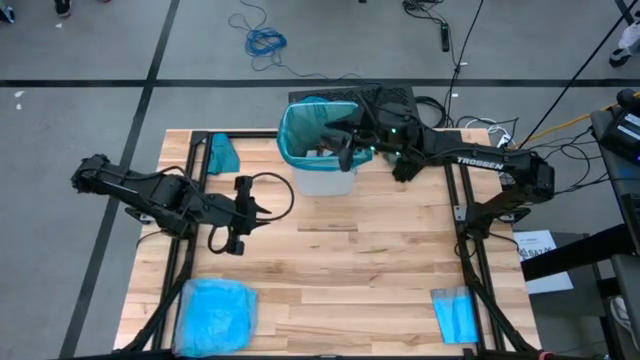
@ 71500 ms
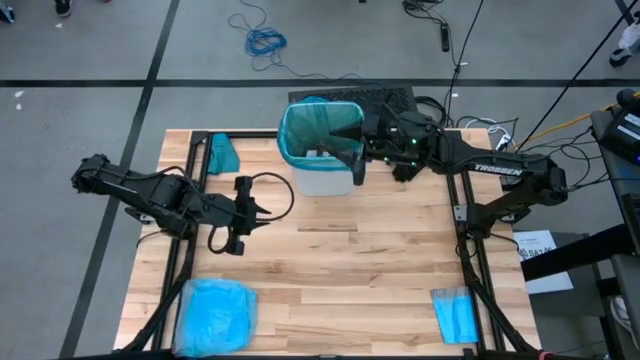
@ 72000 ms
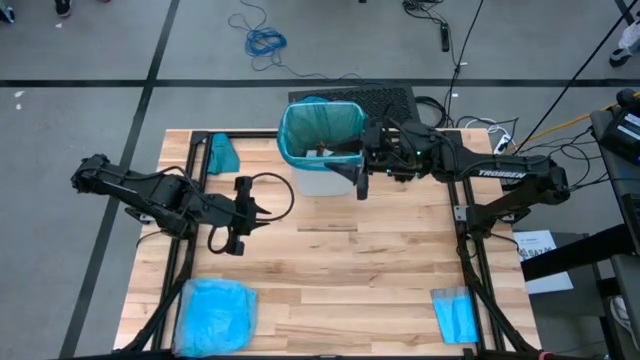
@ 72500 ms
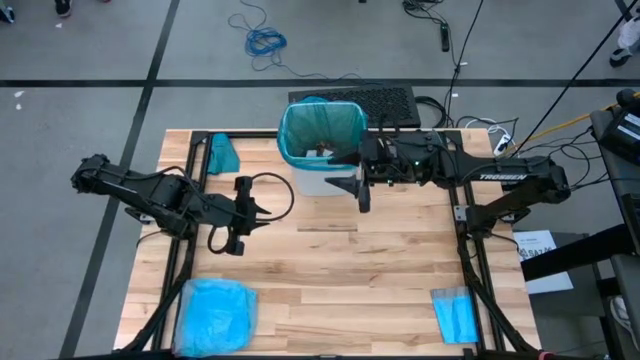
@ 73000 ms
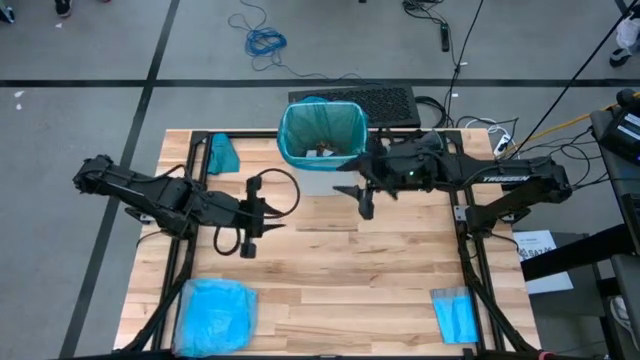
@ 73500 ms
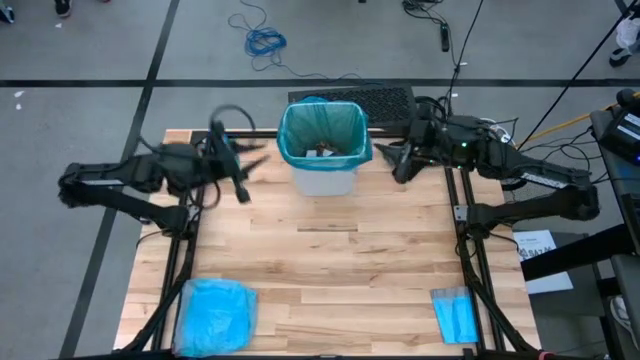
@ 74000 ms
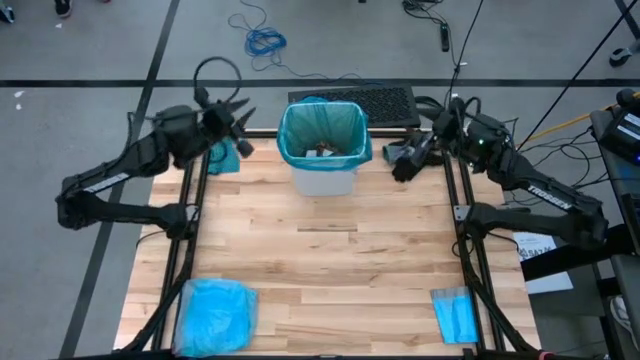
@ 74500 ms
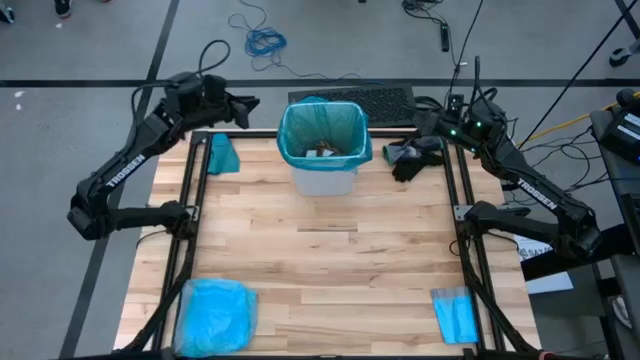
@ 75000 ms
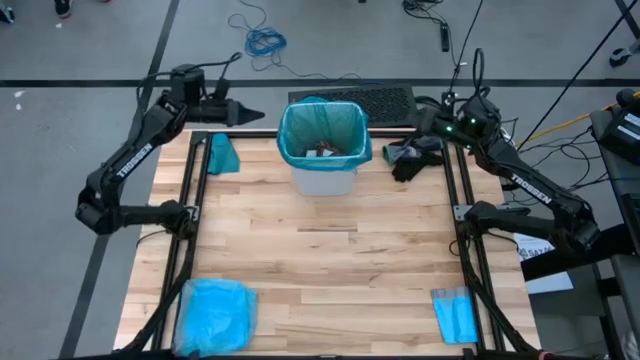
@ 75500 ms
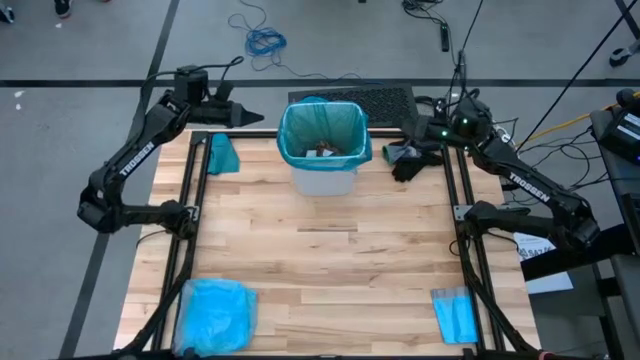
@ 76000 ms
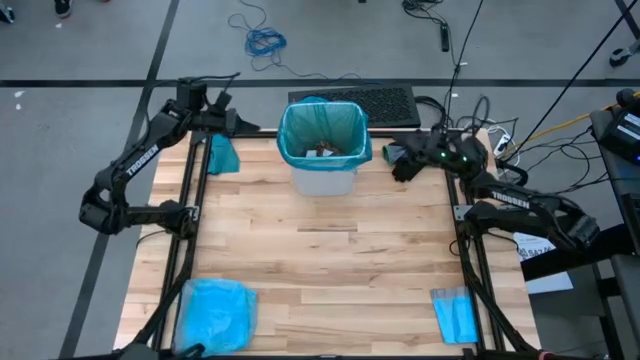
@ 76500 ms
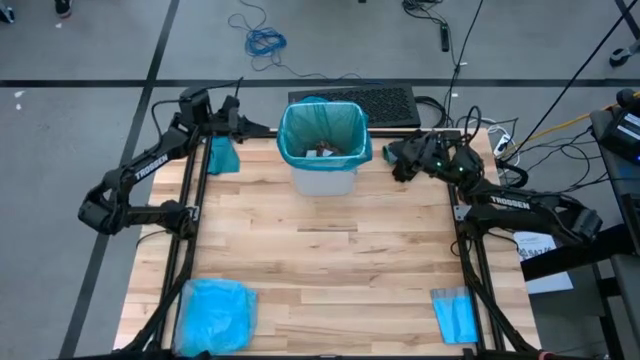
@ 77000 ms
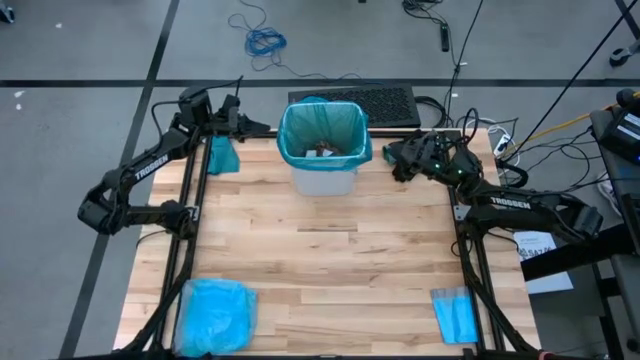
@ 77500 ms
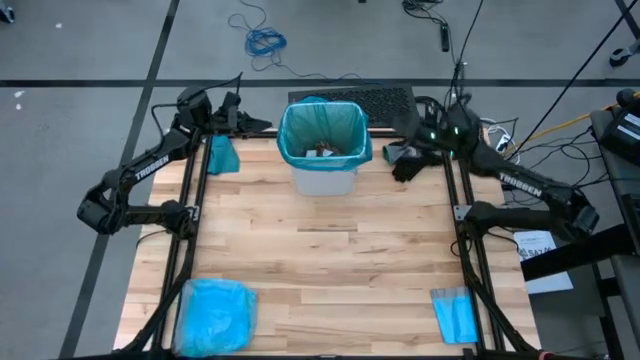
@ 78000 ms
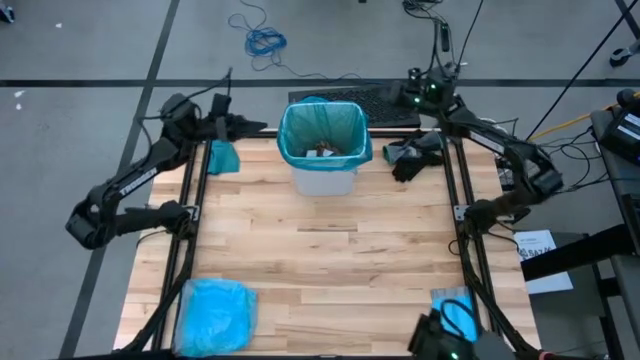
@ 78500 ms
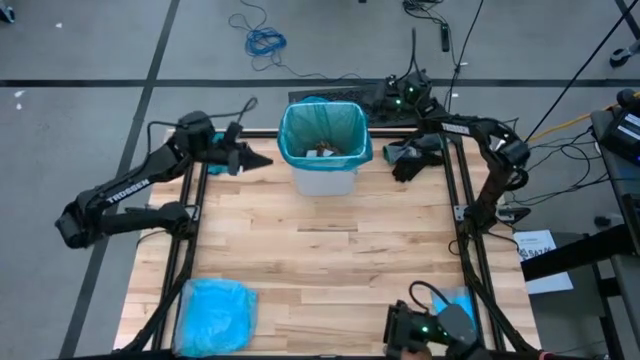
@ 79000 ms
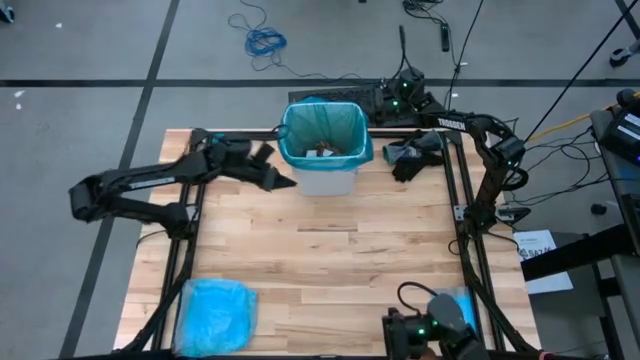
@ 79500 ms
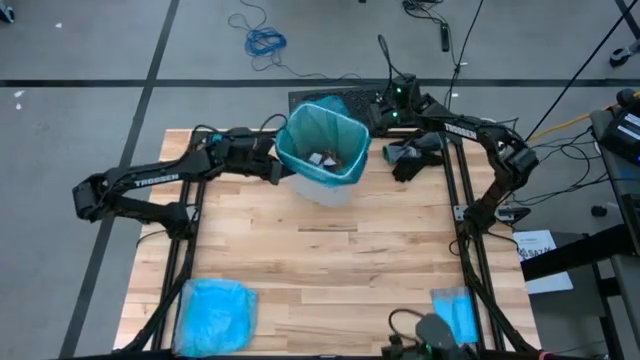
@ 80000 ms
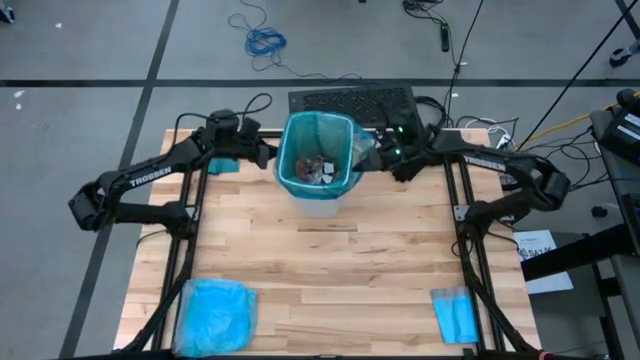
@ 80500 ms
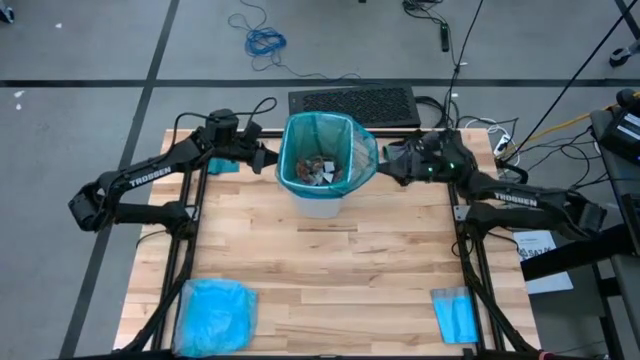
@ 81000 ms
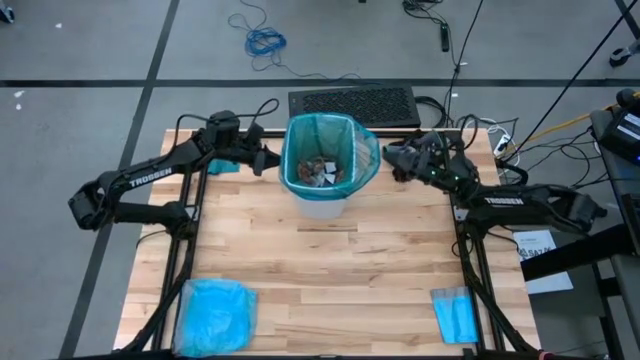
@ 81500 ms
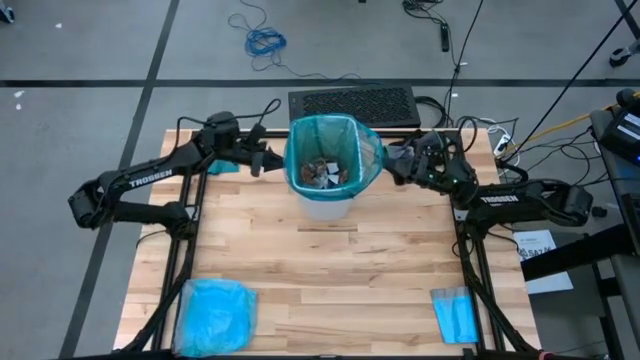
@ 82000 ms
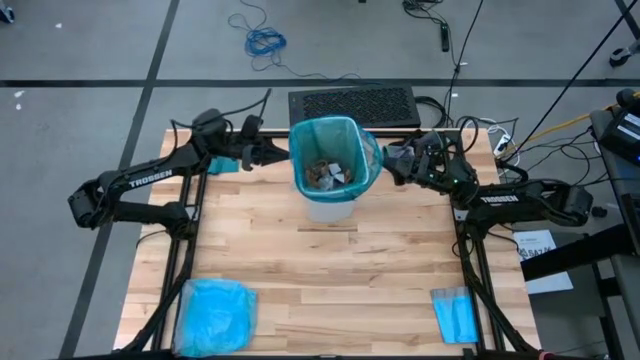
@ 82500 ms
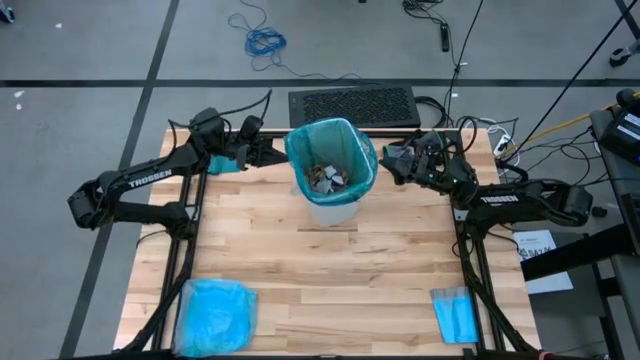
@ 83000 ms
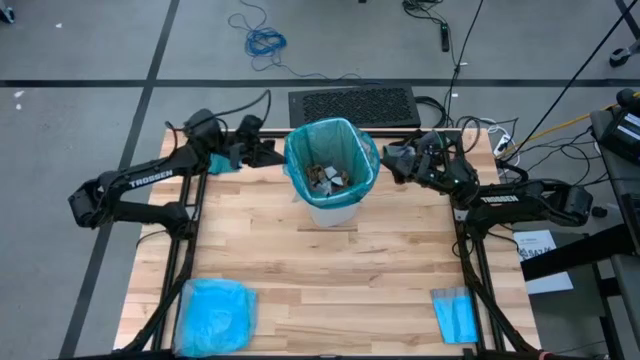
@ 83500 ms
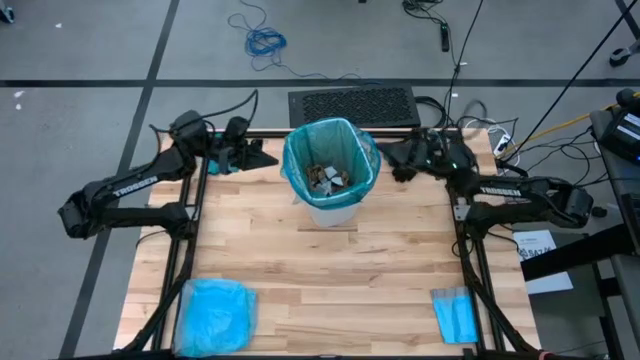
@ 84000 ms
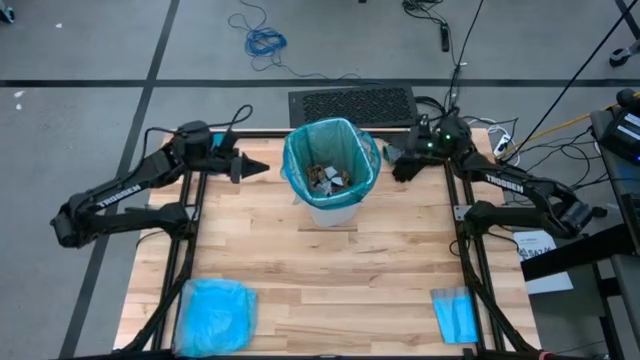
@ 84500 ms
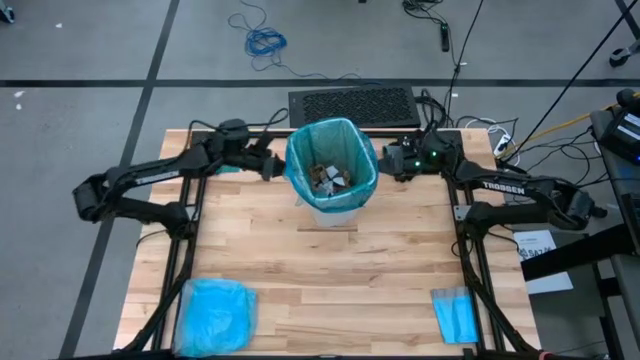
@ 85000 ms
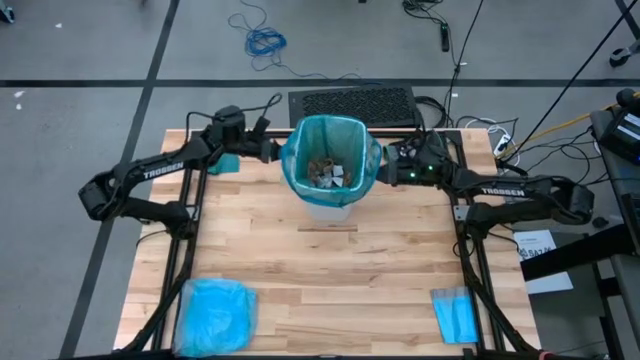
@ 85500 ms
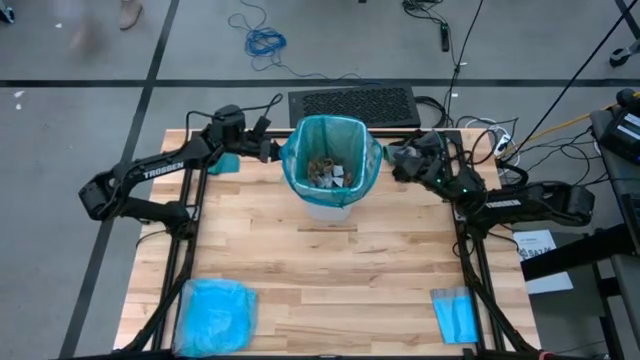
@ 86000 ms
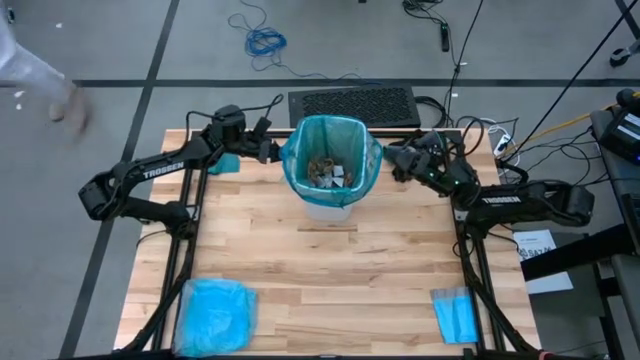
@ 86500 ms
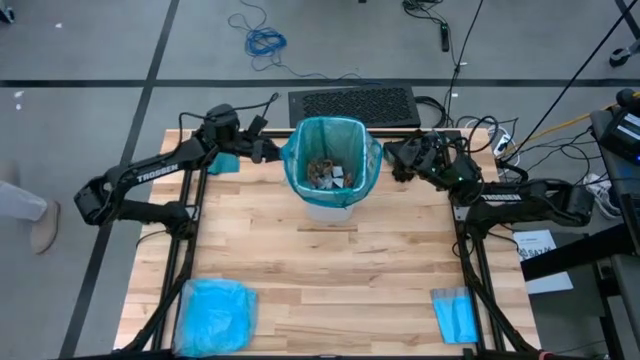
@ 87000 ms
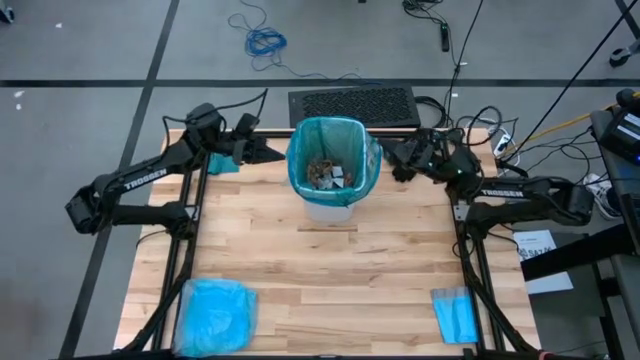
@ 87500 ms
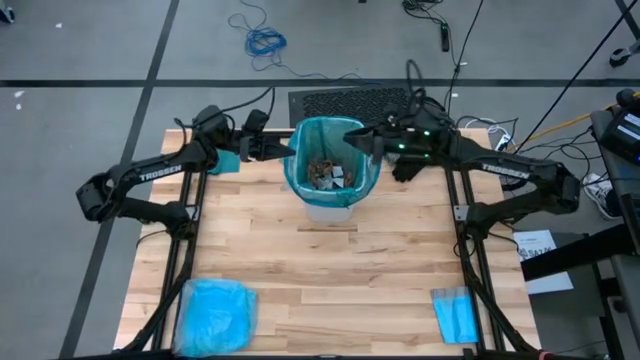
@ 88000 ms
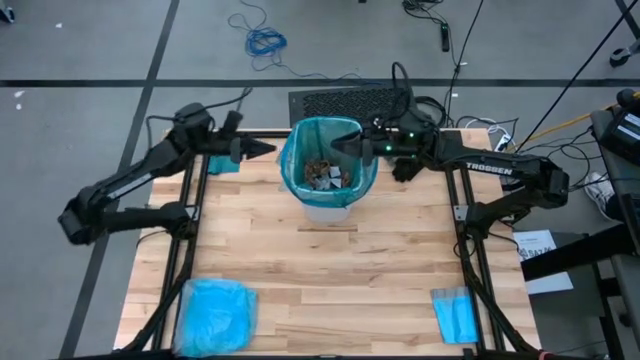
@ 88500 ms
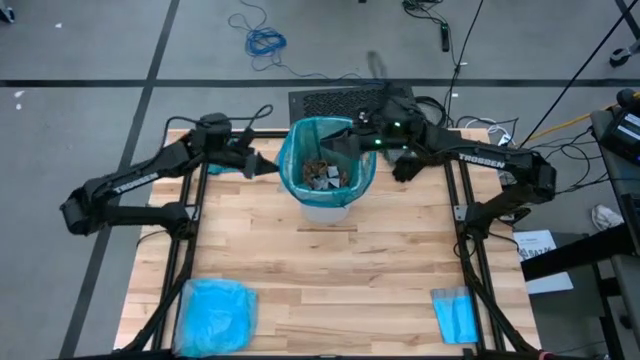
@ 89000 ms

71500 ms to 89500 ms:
Task: place trash/remove bag and relplace
Remove the blue trash bag from the trash bin
